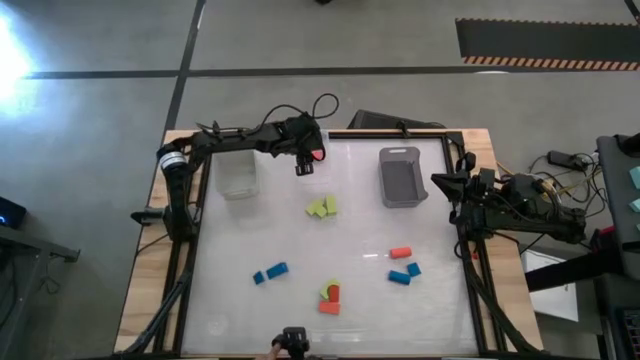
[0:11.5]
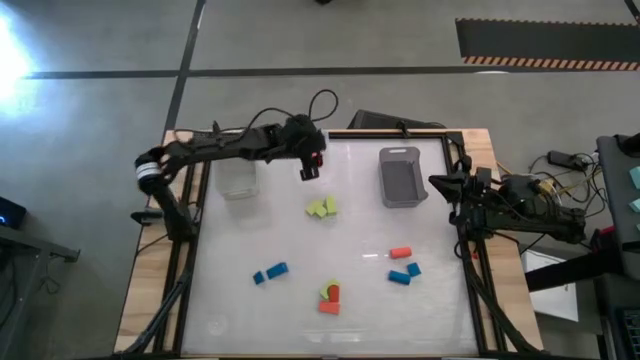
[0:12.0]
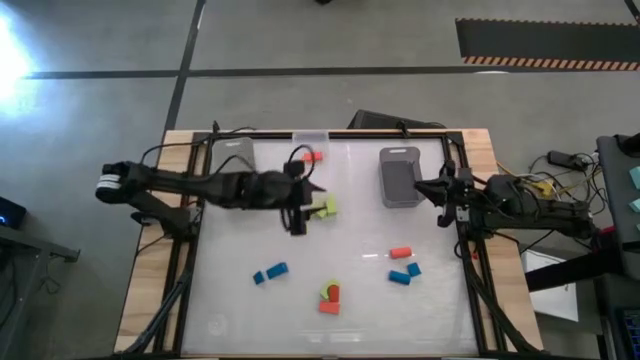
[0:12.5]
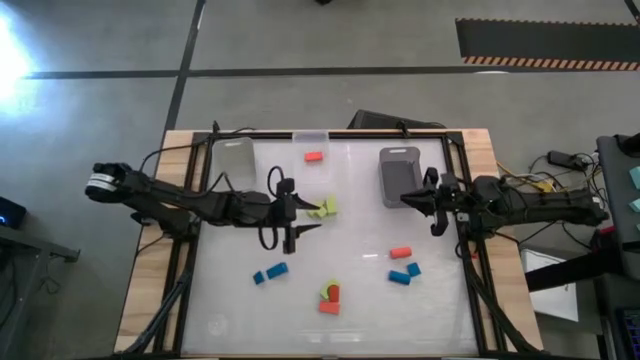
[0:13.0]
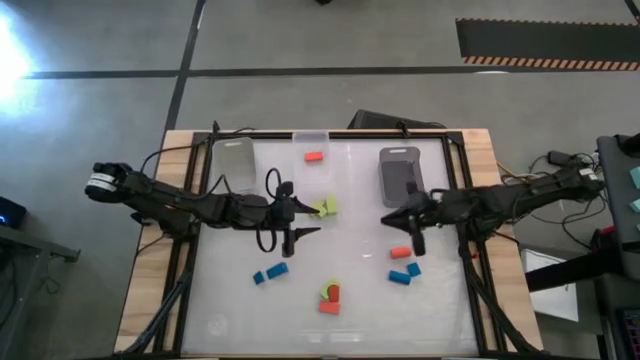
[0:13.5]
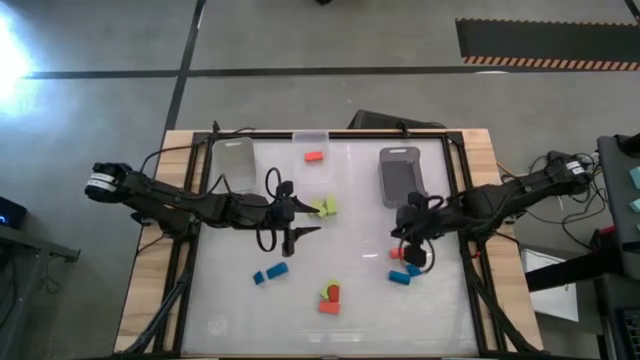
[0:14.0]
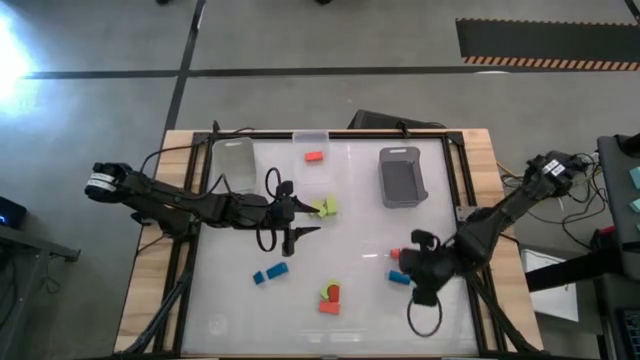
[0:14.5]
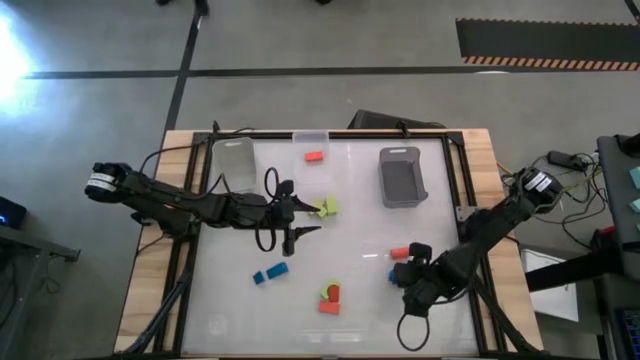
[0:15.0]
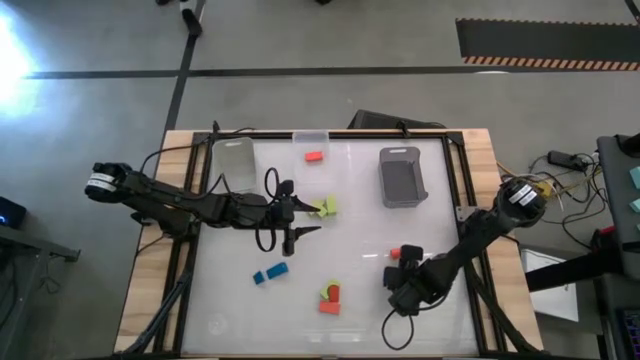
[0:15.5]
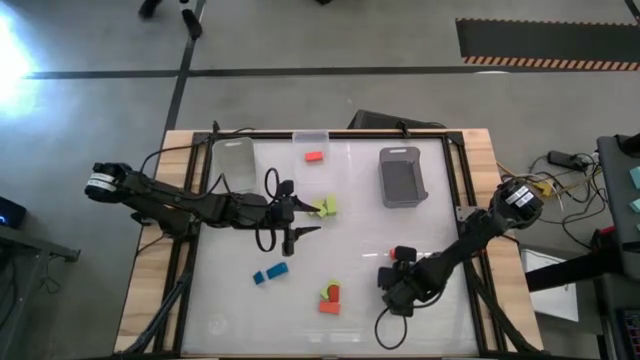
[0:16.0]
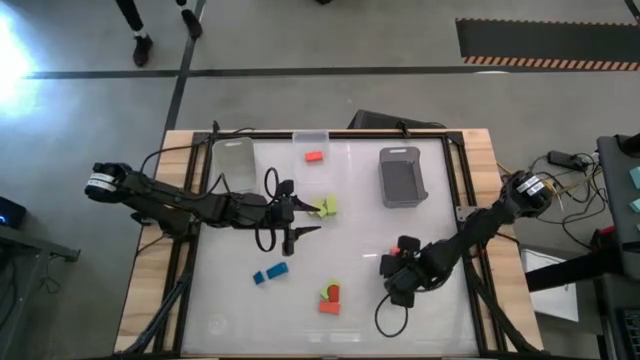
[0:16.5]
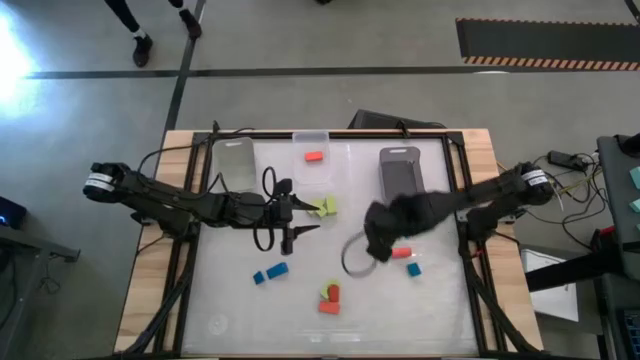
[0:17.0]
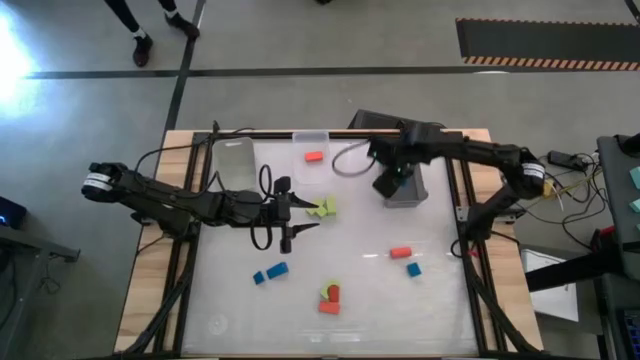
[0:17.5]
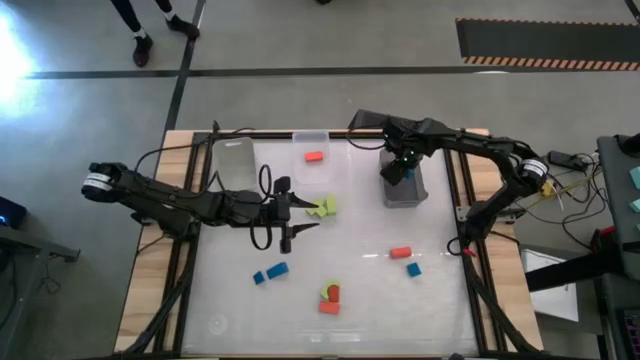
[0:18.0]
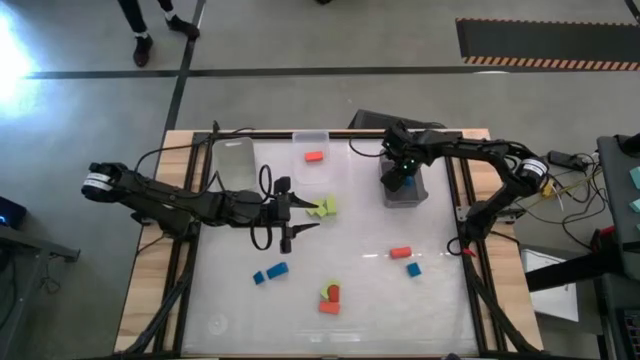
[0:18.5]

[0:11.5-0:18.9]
Task: Sort & place blocks by color
Put the blue block into the black bin

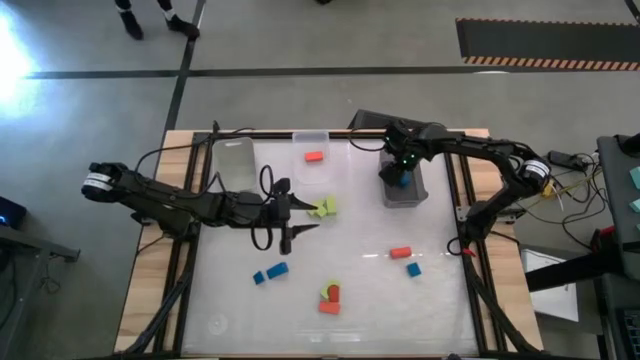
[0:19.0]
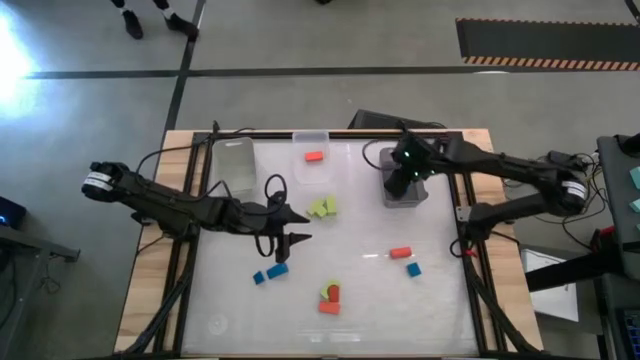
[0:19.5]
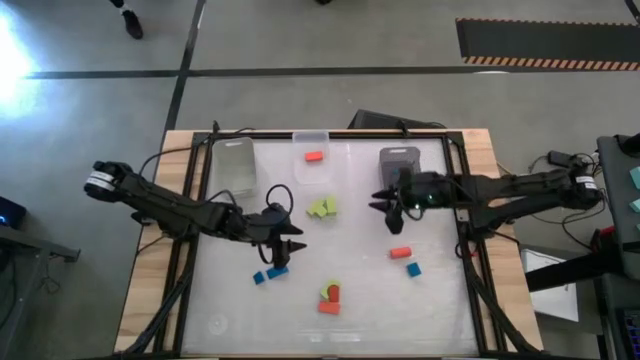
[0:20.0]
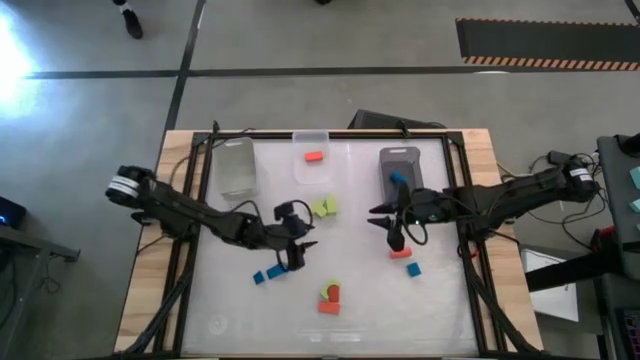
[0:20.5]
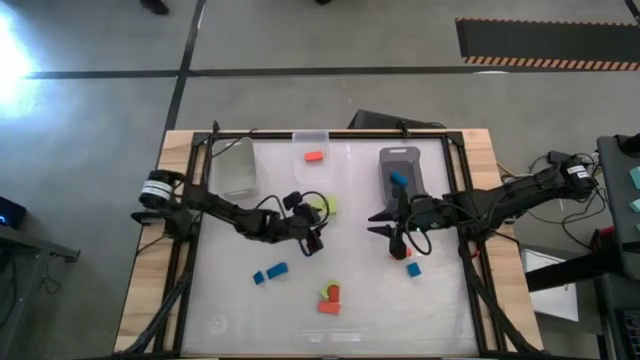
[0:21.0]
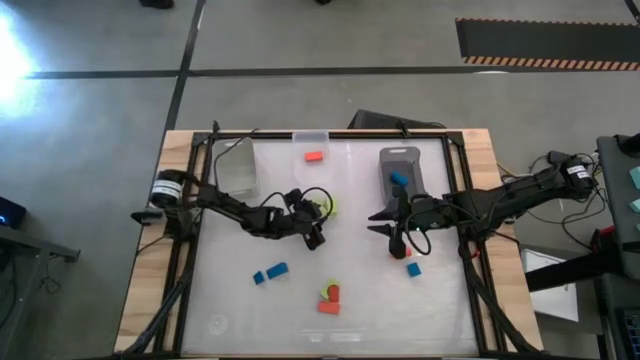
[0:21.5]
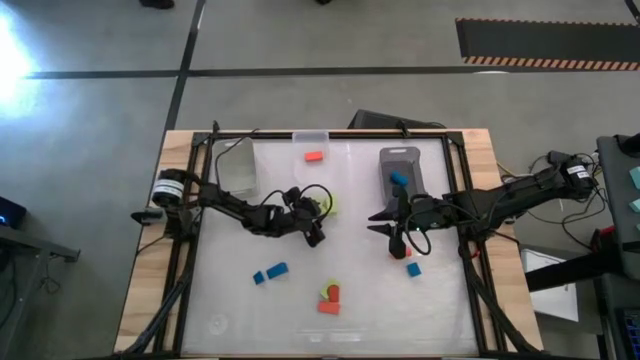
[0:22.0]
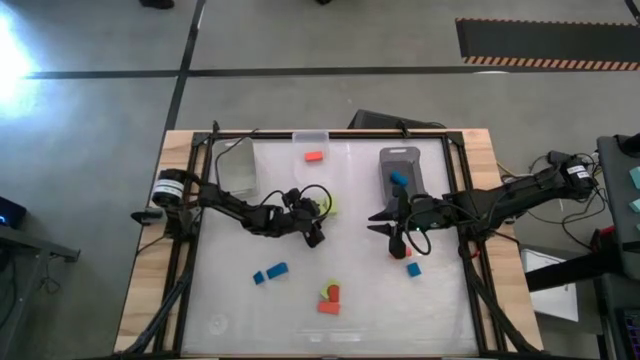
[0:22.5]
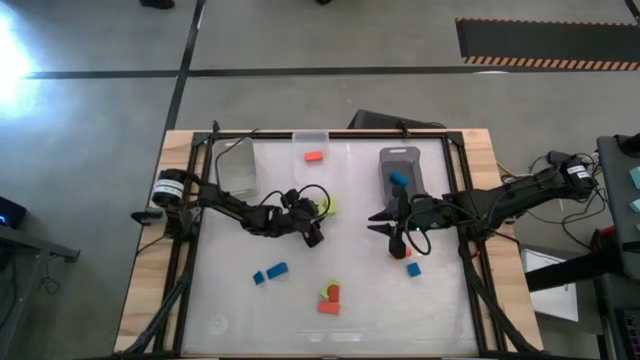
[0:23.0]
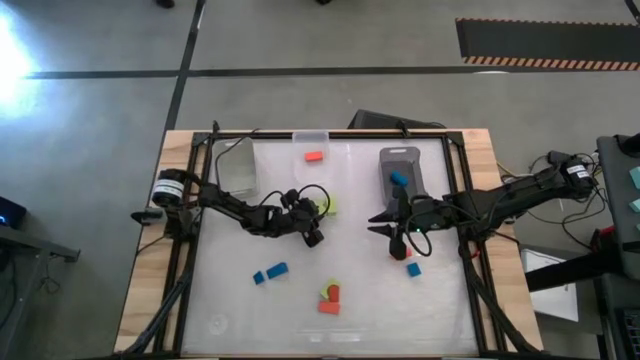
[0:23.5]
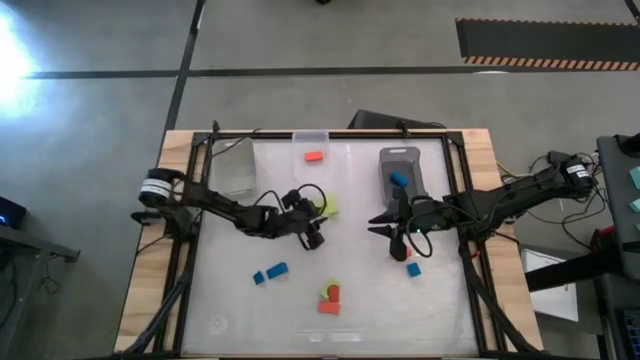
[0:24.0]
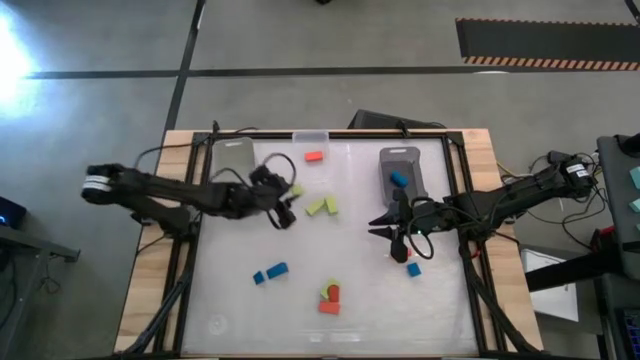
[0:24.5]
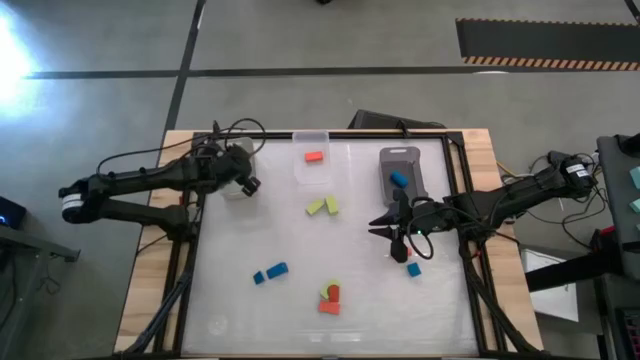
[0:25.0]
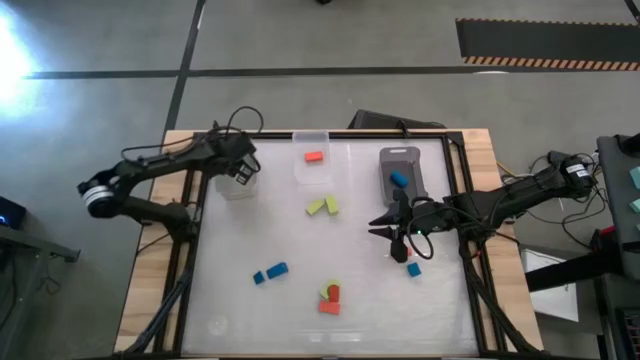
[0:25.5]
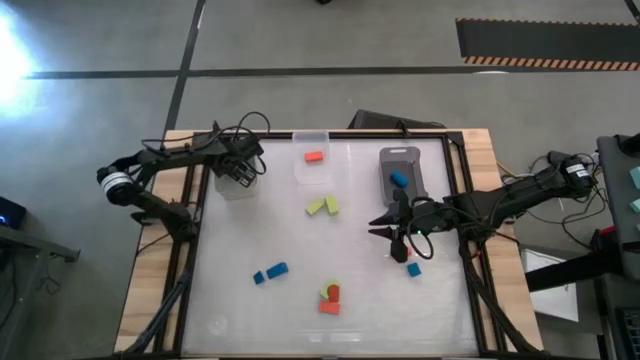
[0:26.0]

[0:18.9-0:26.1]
Put the green block into the white bin

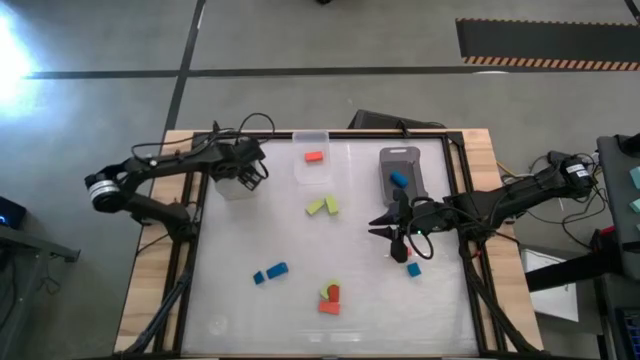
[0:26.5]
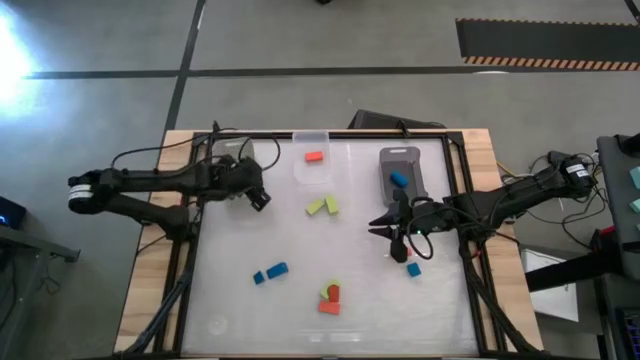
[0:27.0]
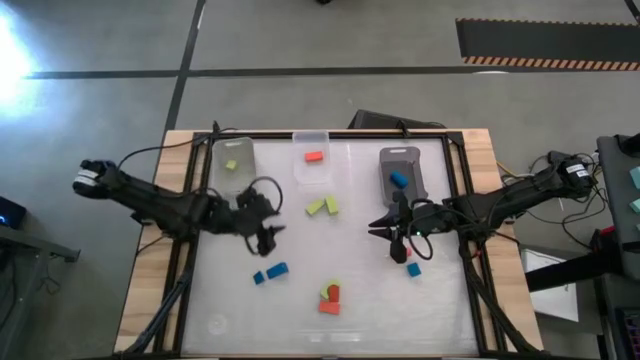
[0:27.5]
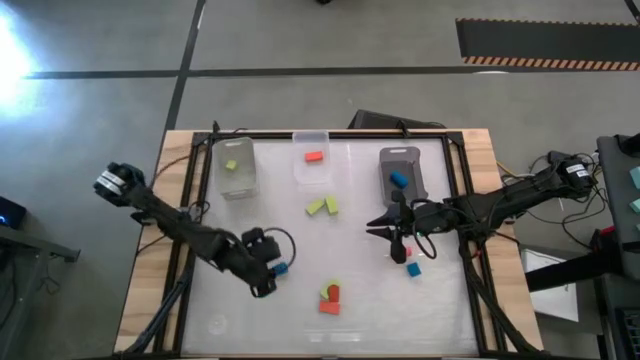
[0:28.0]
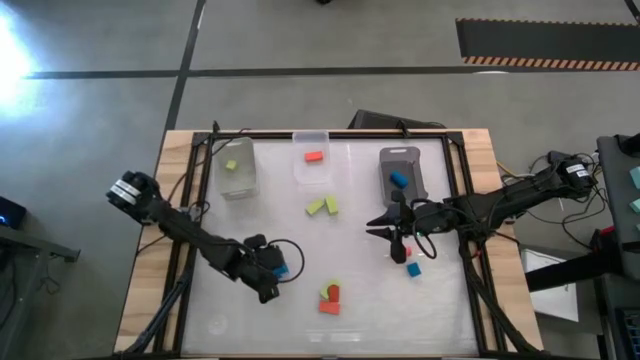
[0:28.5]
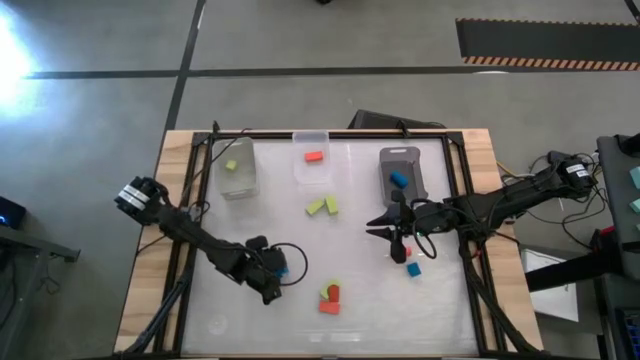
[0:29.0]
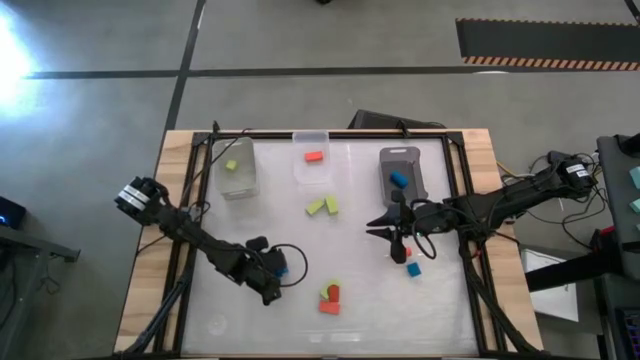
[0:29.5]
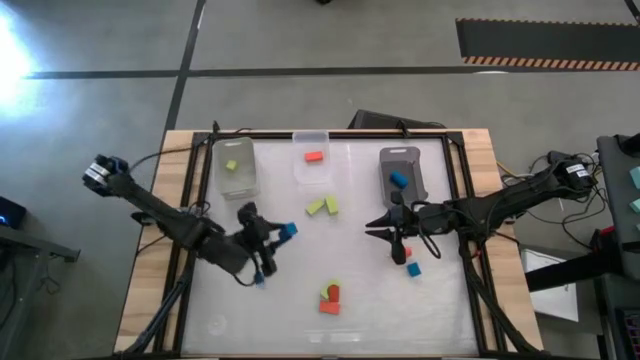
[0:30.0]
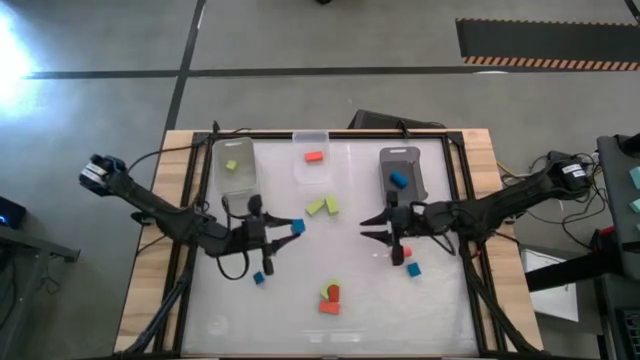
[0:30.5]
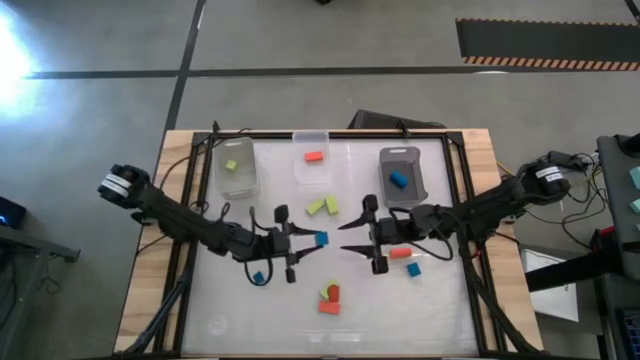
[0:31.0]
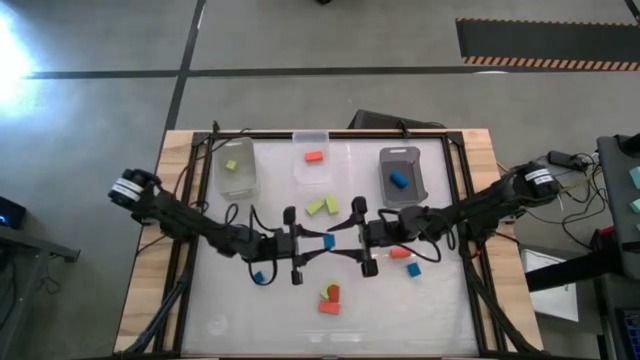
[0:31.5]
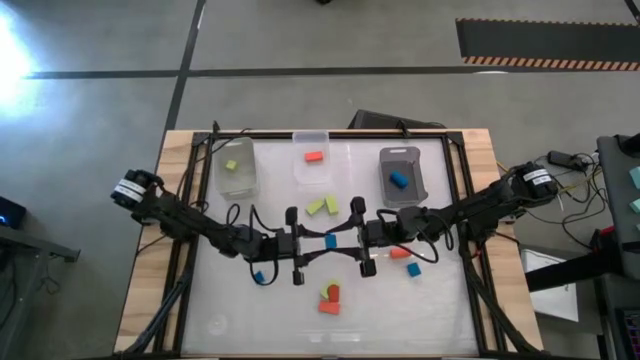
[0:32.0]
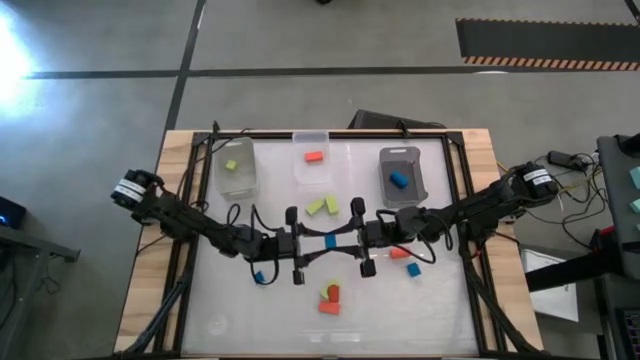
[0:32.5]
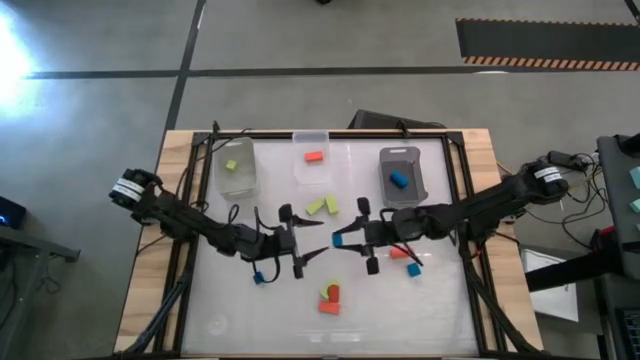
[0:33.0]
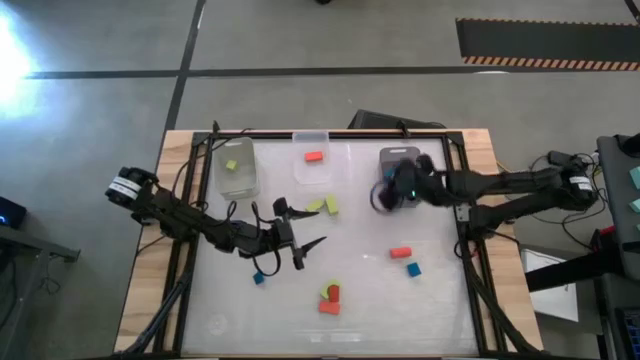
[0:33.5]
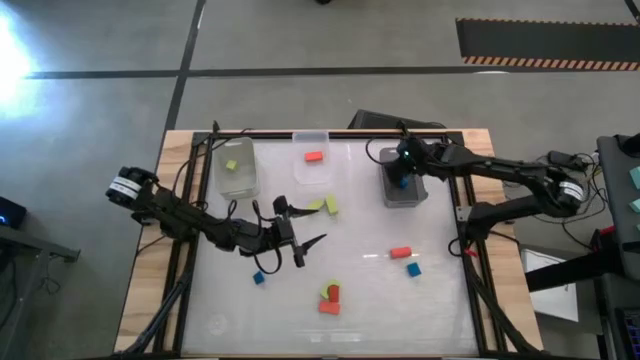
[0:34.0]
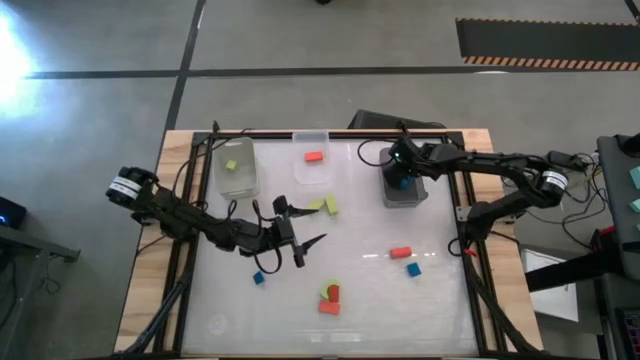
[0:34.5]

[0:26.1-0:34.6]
Put the blue block into the black bin
